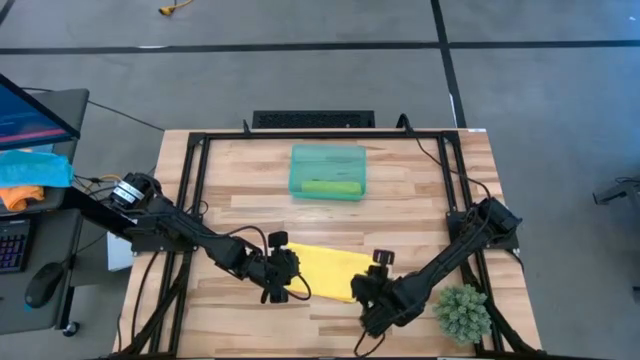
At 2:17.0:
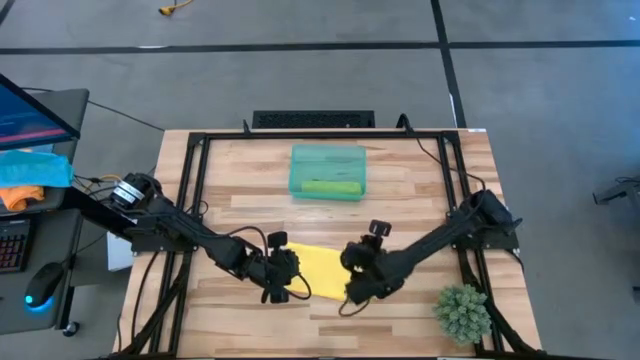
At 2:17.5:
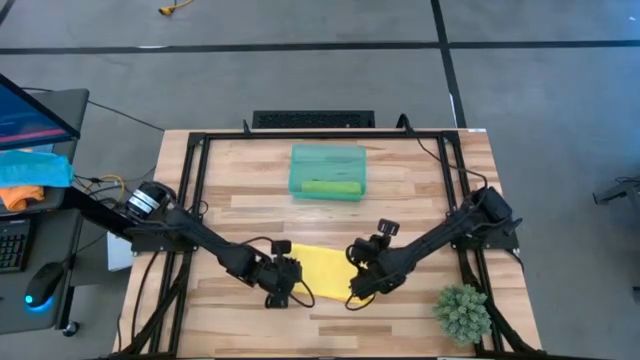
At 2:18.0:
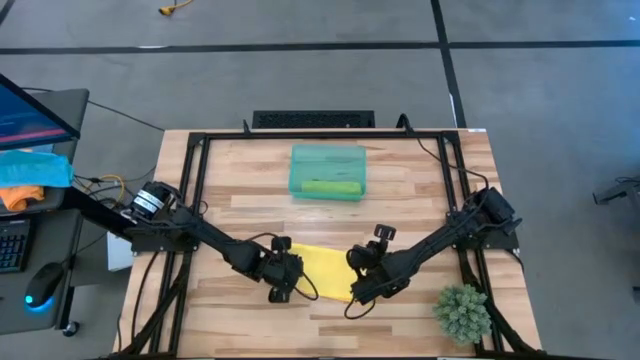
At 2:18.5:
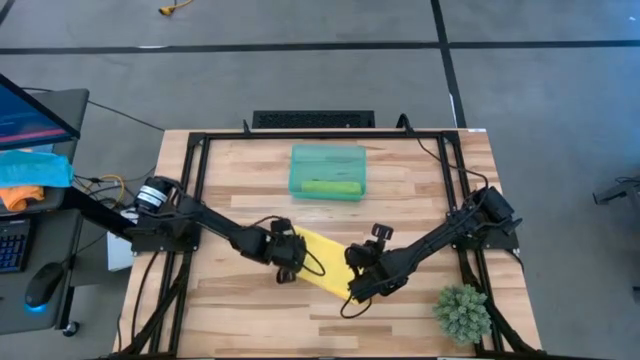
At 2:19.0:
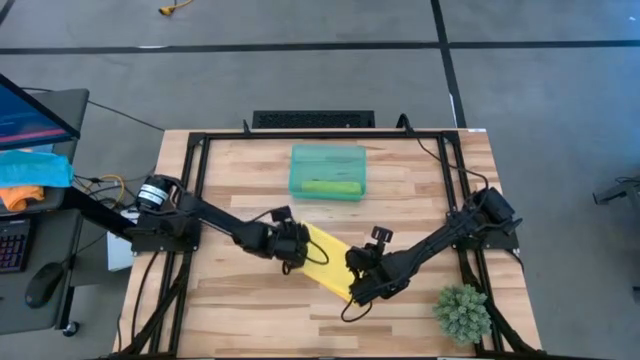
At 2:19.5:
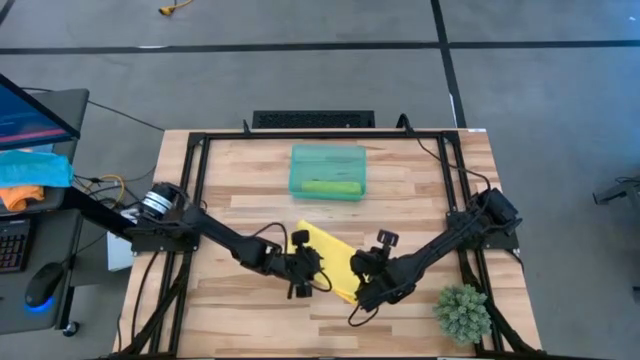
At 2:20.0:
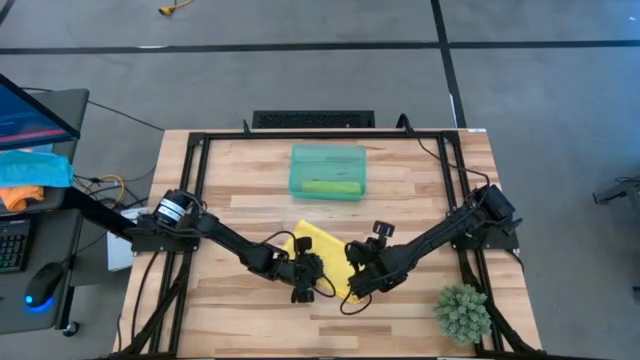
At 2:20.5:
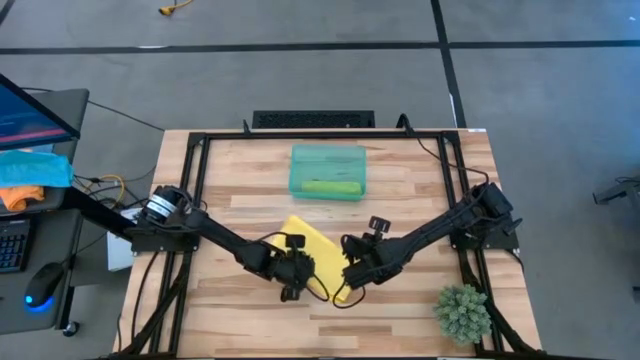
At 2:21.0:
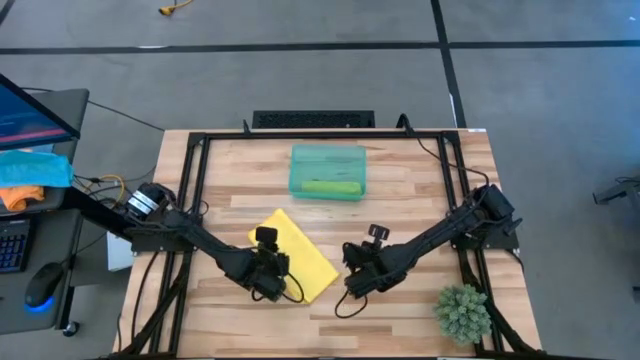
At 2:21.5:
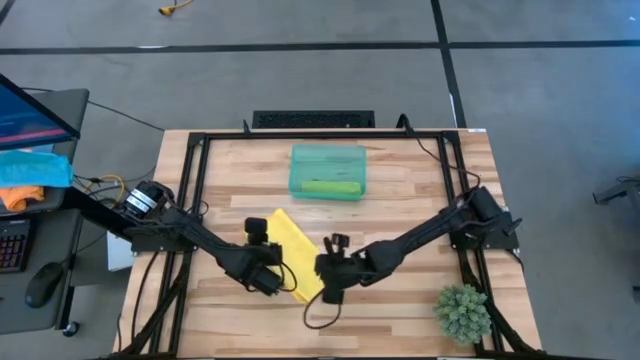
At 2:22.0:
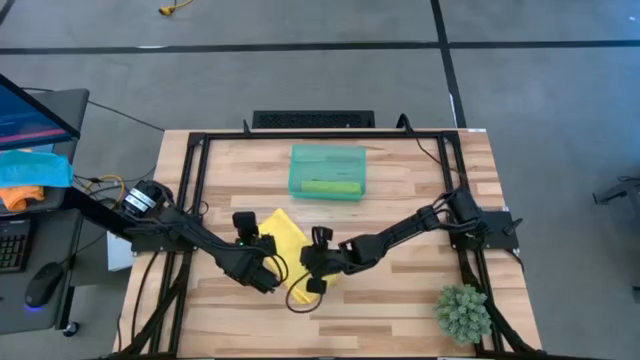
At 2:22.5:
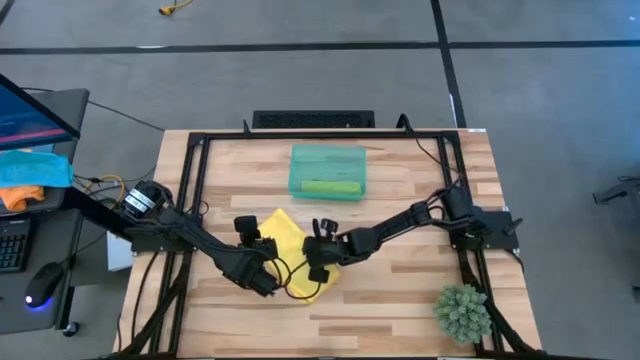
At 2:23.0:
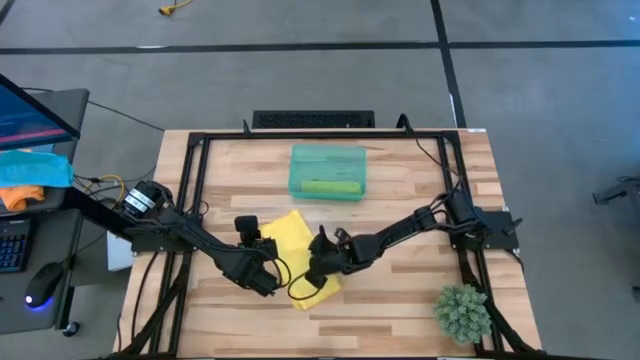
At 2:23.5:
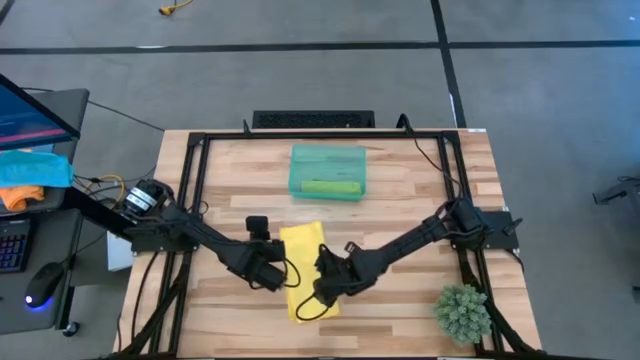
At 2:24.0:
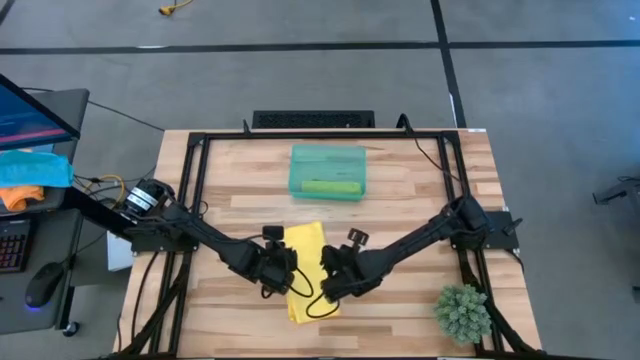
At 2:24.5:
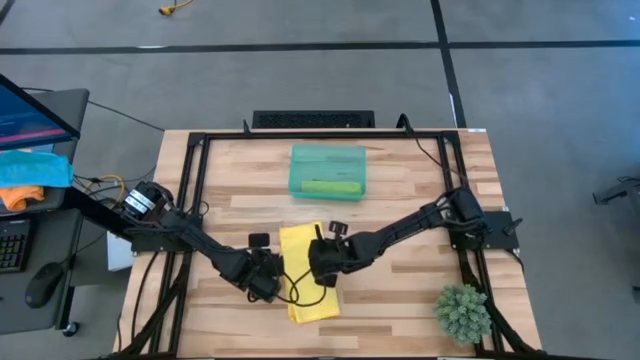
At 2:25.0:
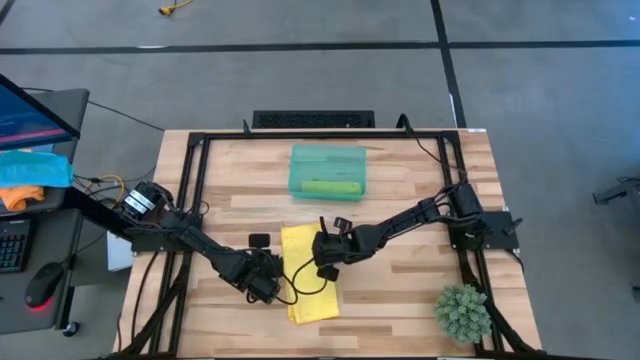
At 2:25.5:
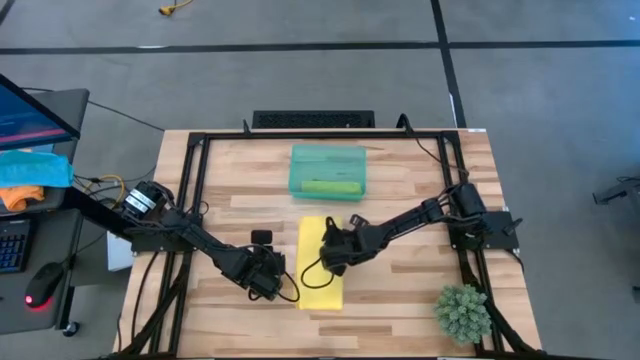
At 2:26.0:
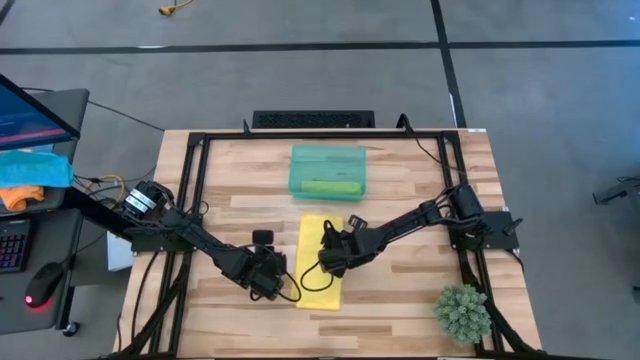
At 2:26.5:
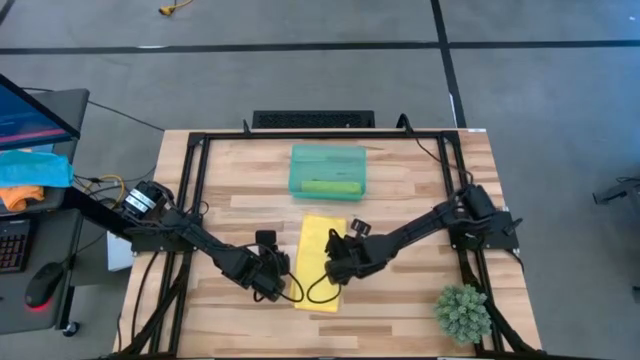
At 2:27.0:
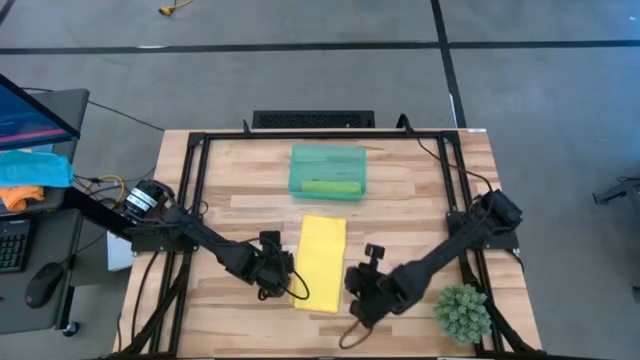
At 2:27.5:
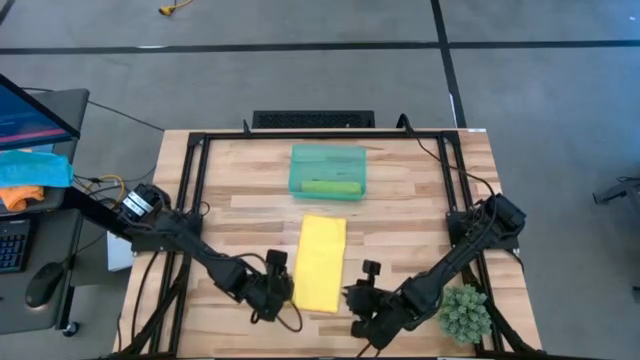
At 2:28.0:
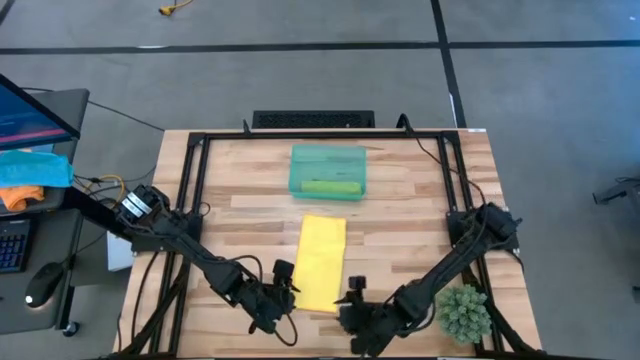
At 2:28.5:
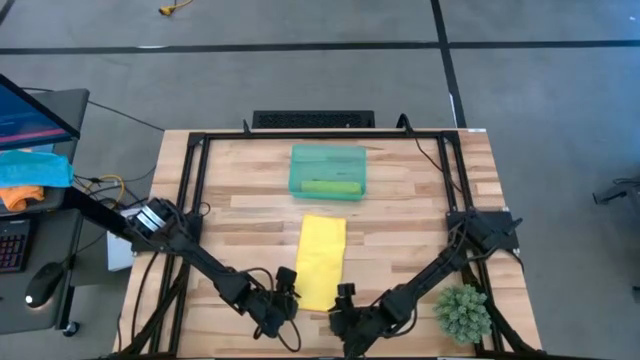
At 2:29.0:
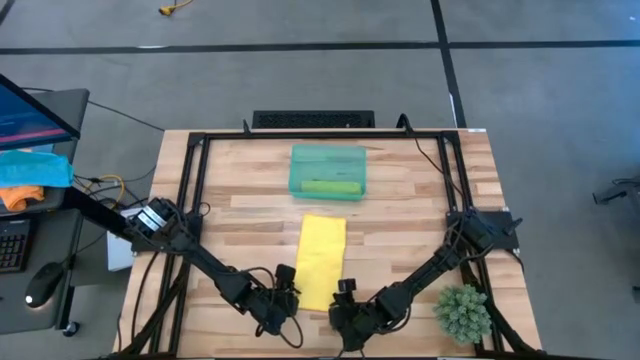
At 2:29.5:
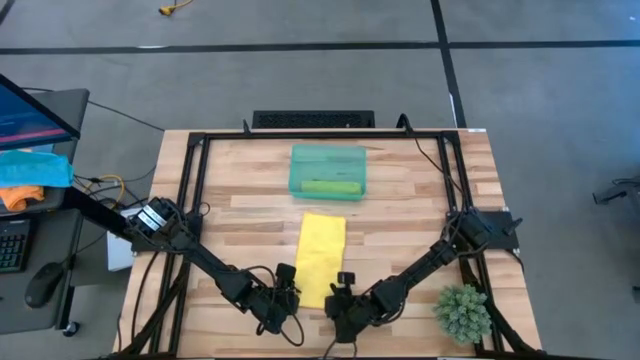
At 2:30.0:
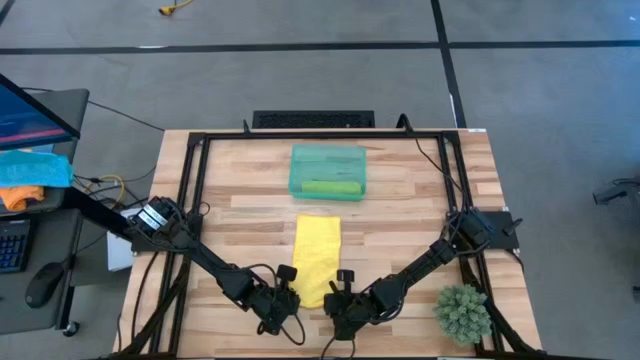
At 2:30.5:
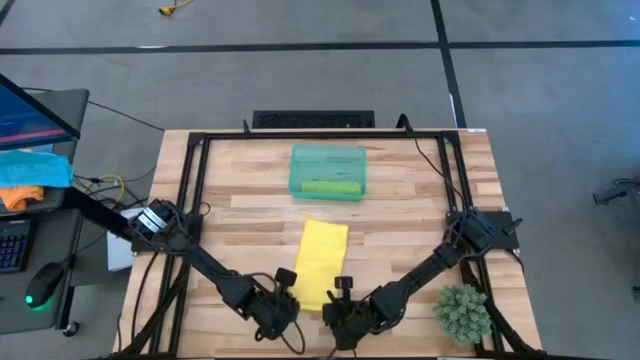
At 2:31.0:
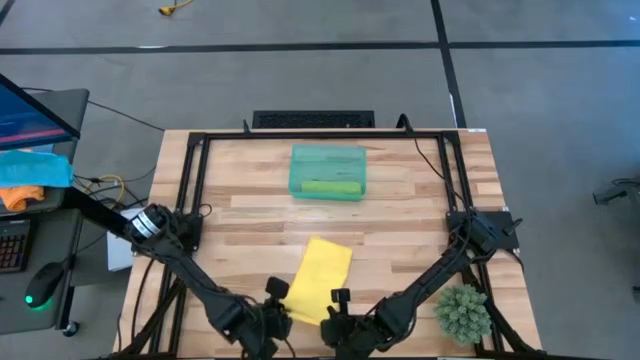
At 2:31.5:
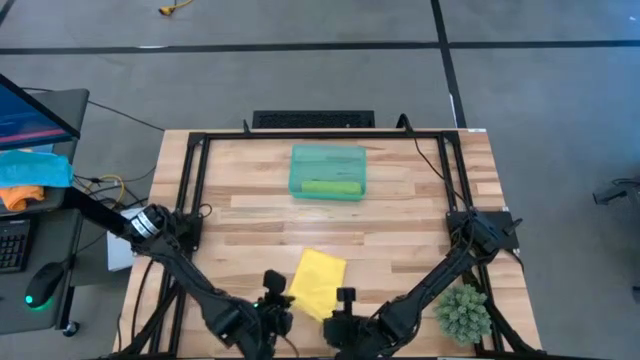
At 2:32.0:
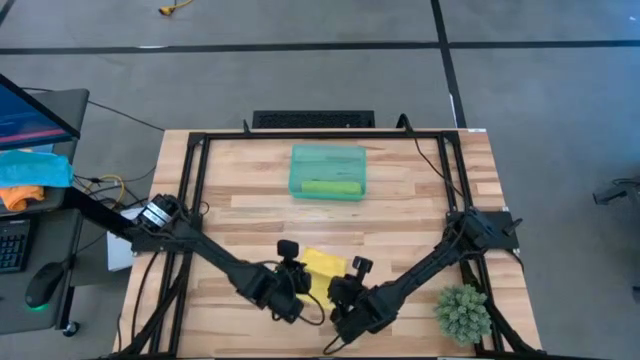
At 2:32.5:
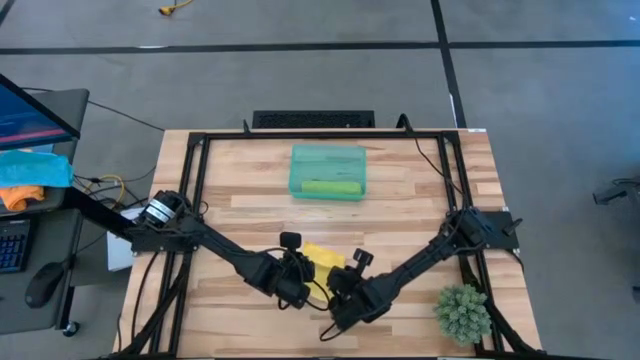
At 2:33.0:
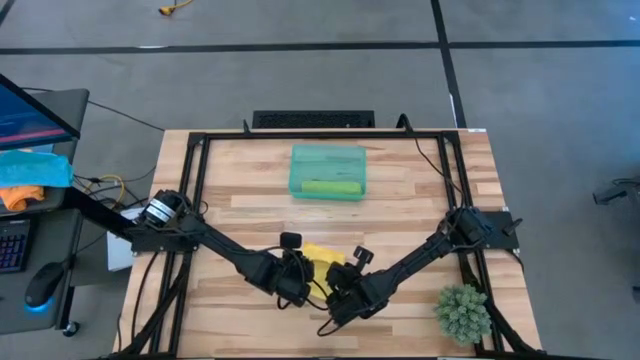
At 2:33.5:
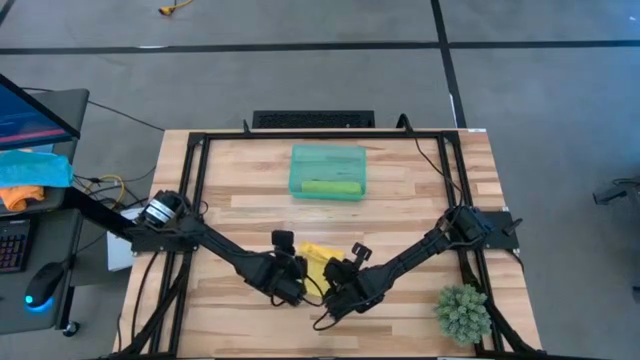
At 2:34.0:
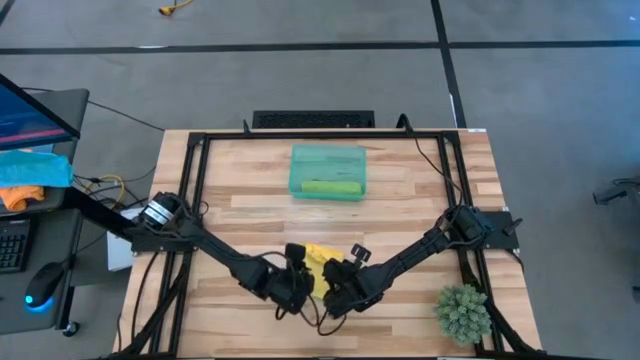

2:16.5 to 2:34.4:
Task: Roll microfiber towels into tight, uniform cylinder then place into a basket
Fold the yellow microfiber towel

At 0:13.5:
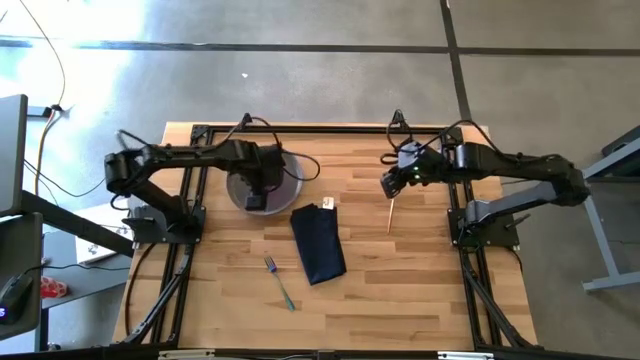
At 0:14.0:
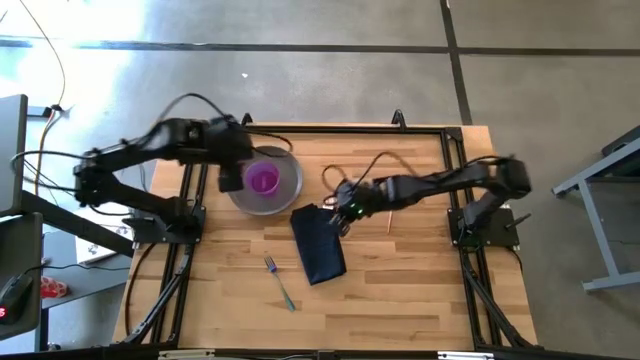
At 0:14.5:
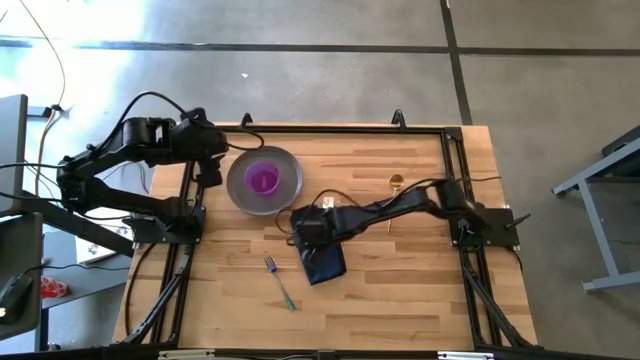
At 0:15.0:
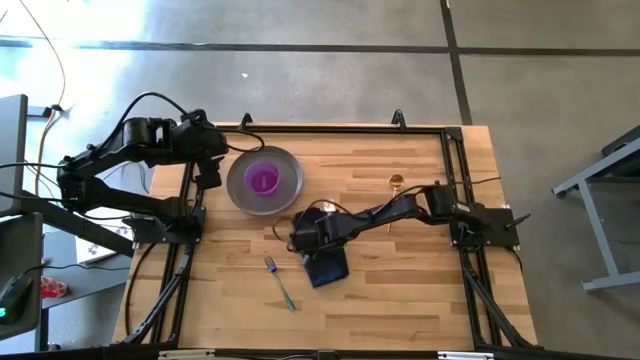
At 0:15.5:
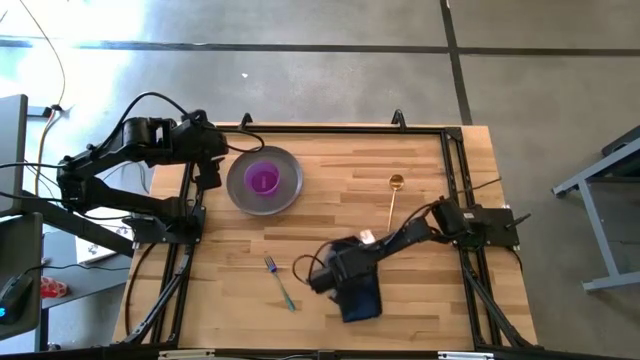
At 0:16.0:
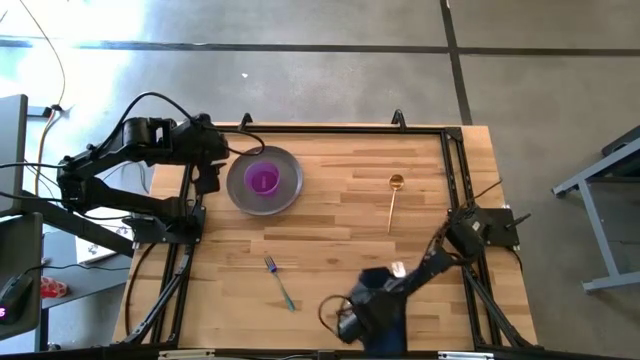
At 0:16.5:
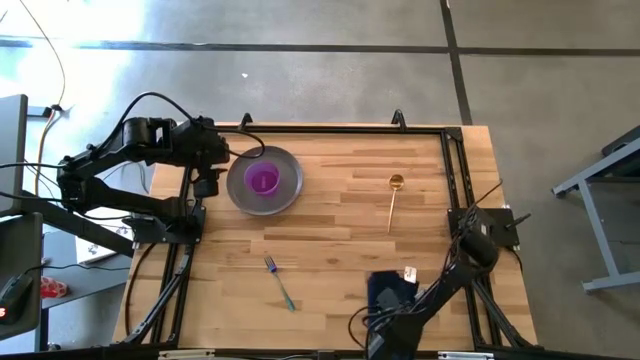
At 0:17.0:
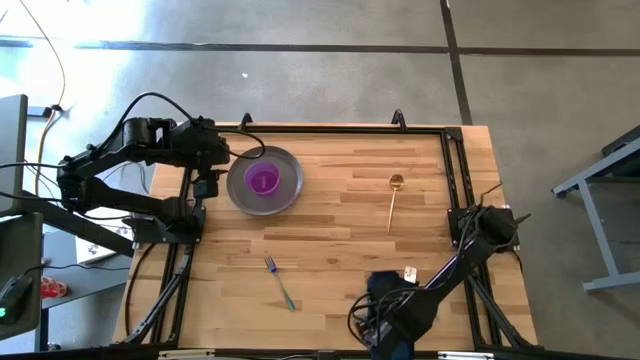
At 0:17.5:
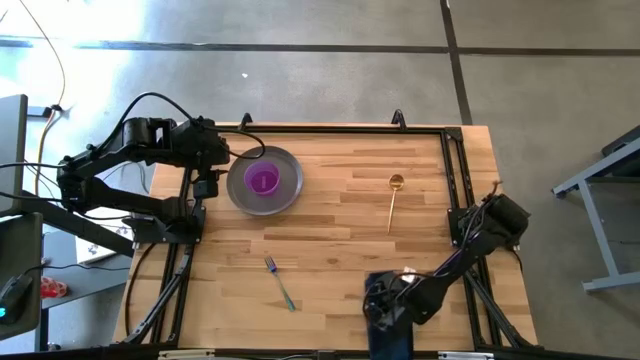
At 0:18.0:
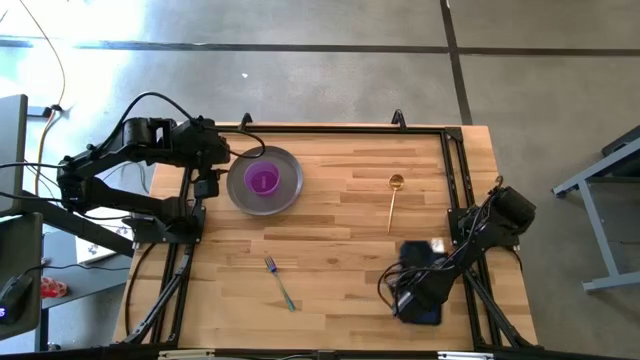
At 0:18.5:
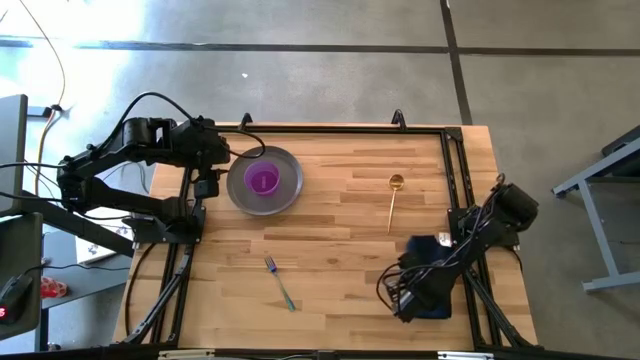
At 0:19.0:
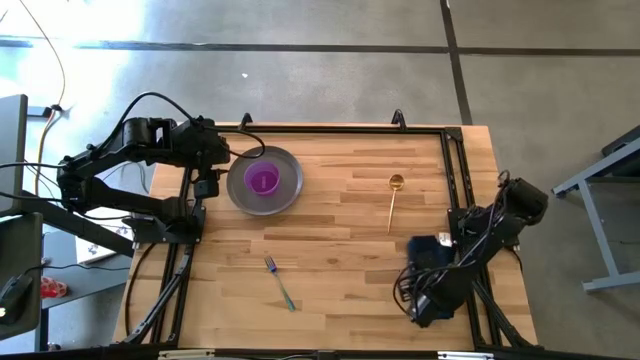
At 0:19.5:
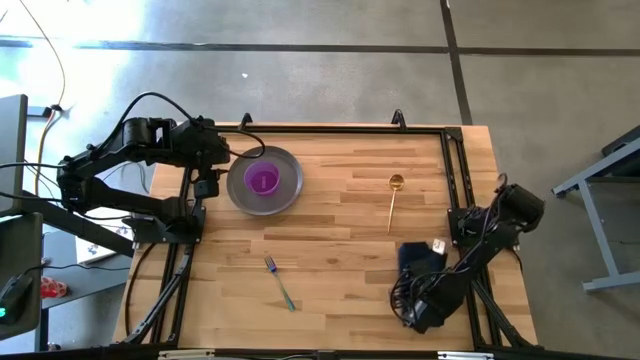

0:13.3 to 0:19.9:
Task: Set table place
Move the blue napkin to the bottom right of the table
